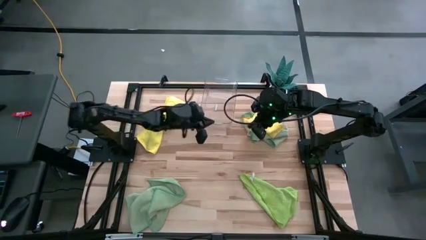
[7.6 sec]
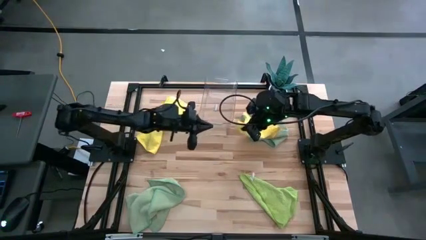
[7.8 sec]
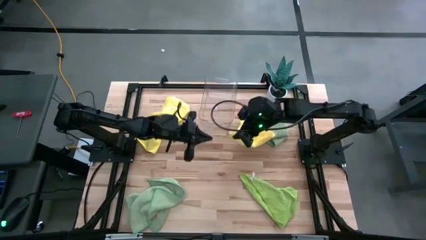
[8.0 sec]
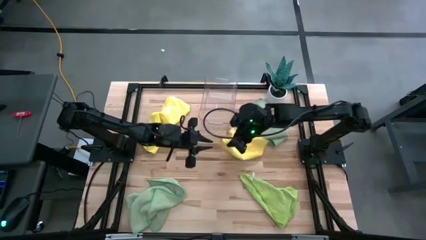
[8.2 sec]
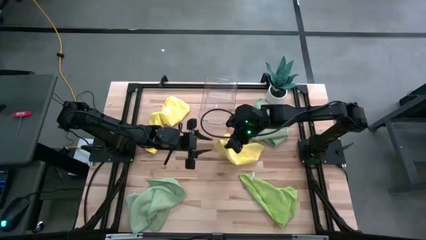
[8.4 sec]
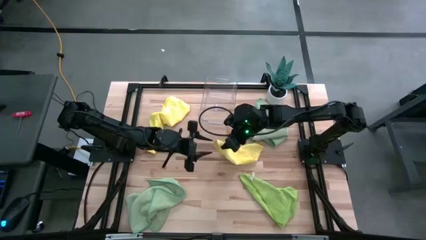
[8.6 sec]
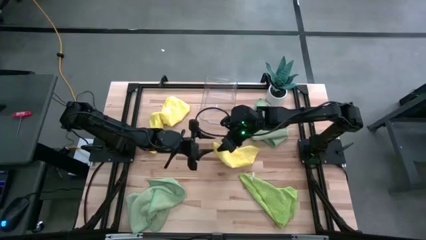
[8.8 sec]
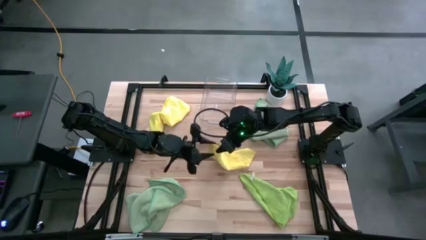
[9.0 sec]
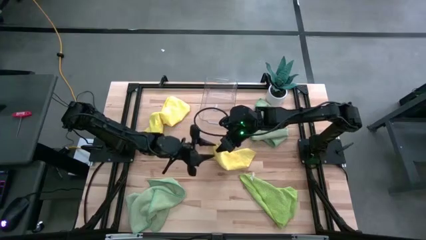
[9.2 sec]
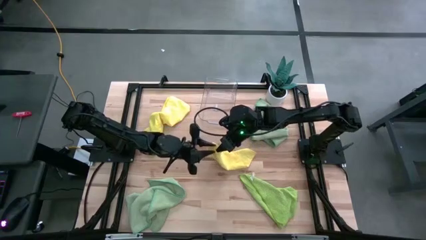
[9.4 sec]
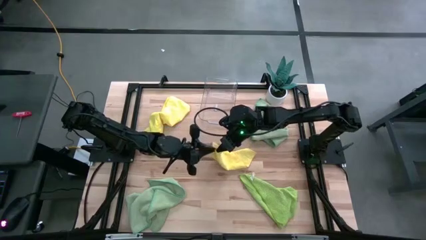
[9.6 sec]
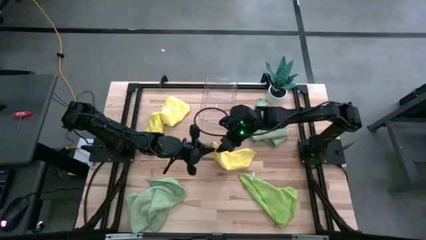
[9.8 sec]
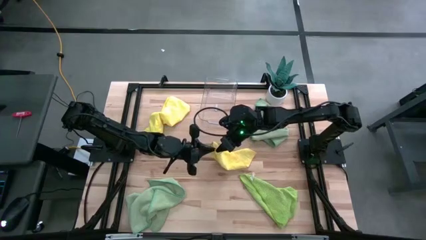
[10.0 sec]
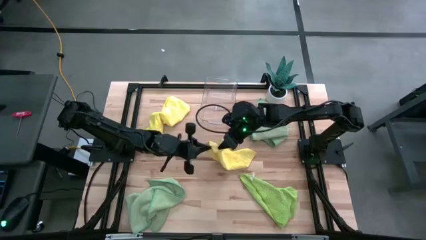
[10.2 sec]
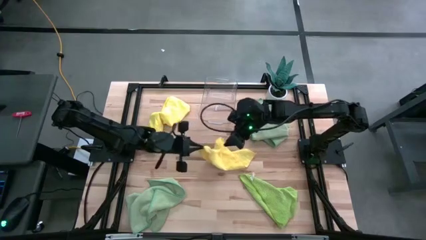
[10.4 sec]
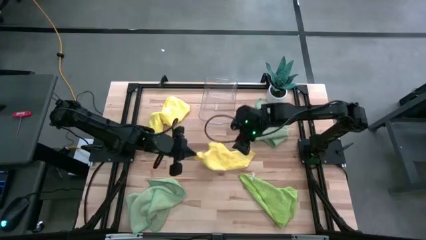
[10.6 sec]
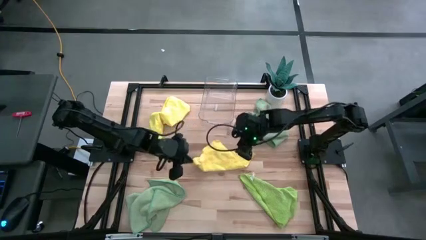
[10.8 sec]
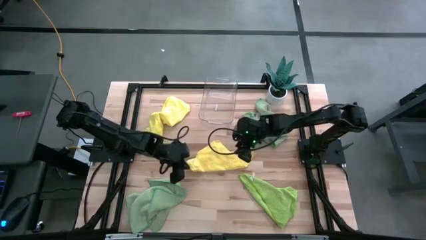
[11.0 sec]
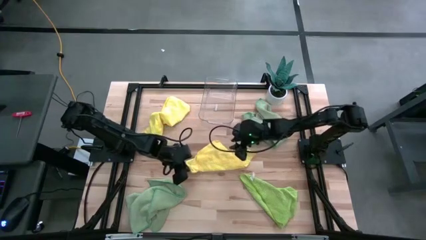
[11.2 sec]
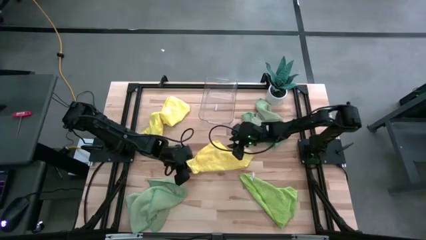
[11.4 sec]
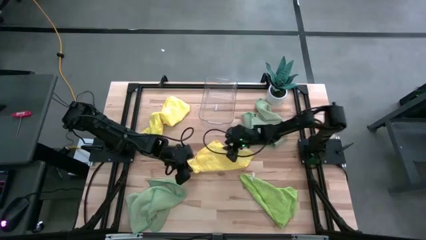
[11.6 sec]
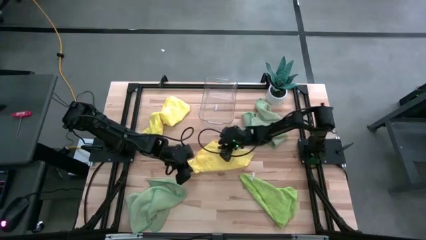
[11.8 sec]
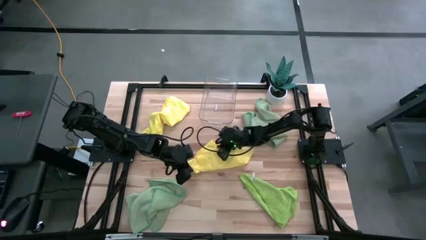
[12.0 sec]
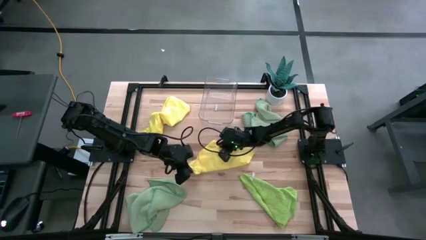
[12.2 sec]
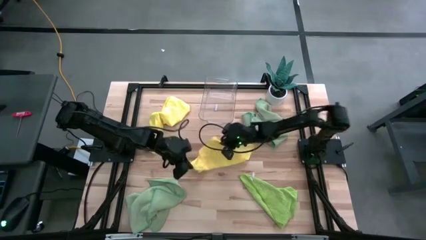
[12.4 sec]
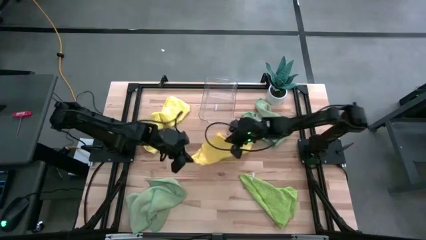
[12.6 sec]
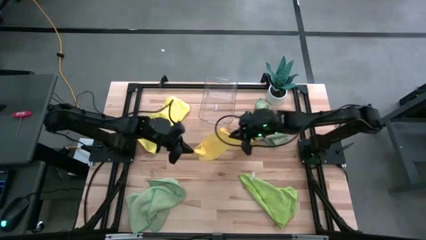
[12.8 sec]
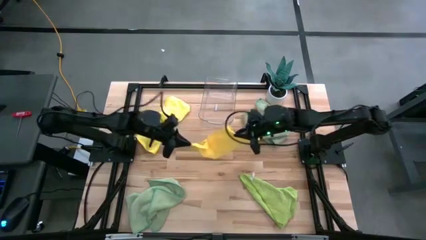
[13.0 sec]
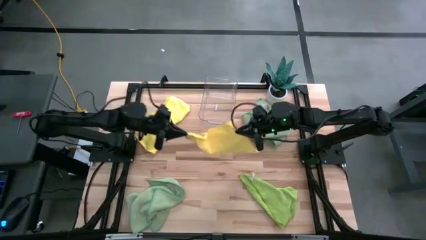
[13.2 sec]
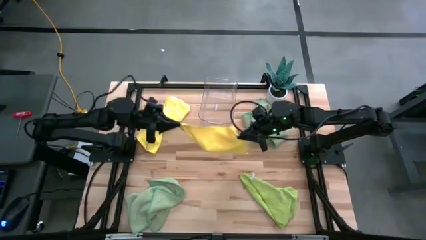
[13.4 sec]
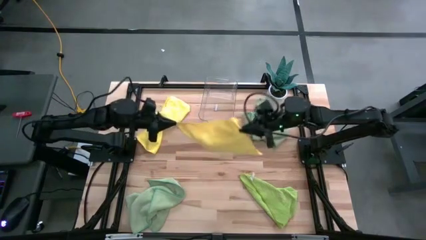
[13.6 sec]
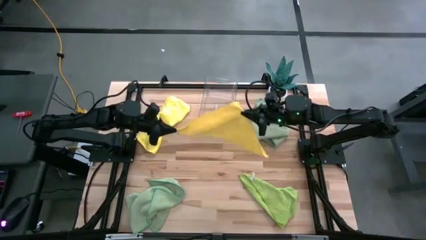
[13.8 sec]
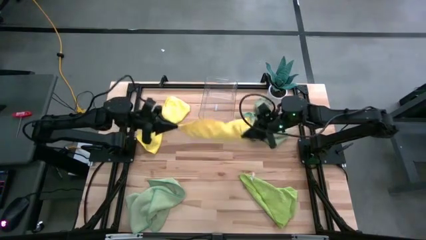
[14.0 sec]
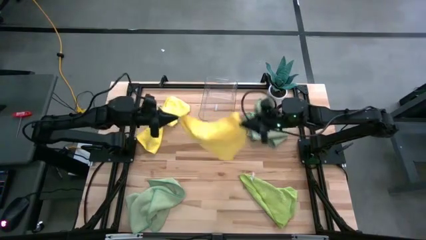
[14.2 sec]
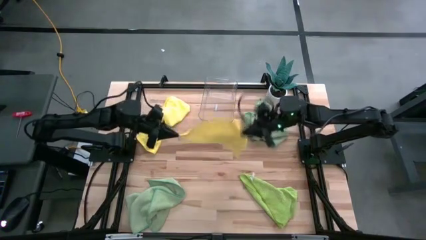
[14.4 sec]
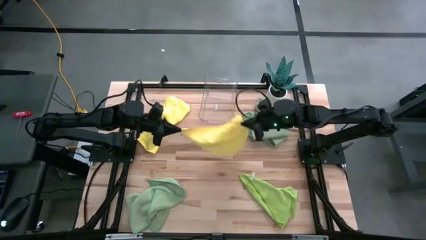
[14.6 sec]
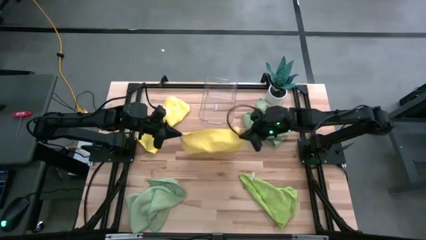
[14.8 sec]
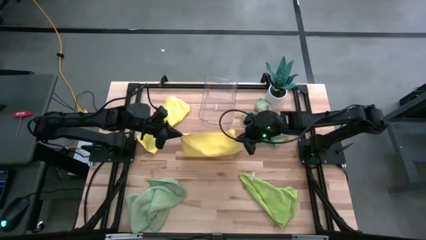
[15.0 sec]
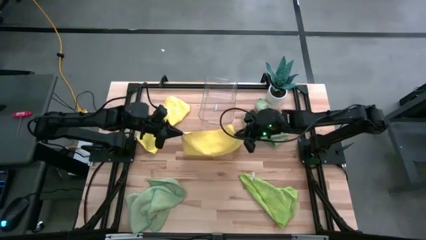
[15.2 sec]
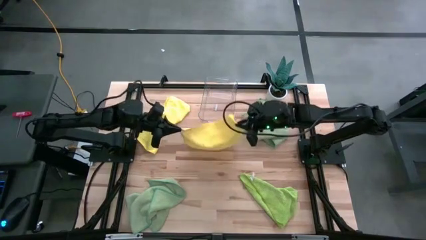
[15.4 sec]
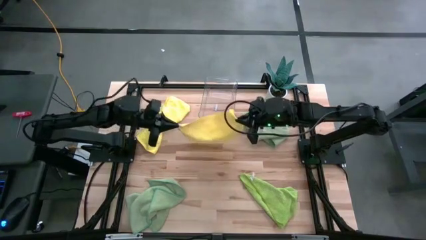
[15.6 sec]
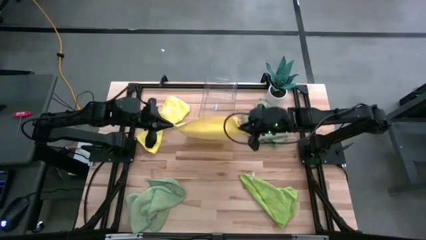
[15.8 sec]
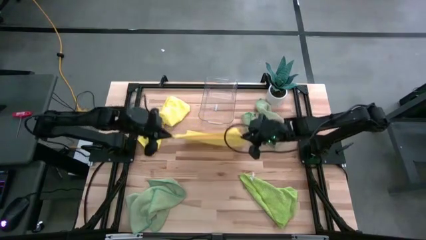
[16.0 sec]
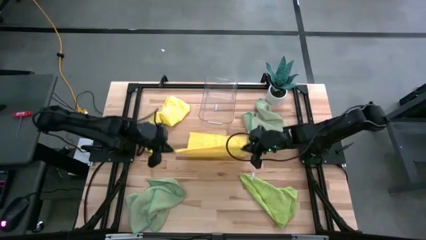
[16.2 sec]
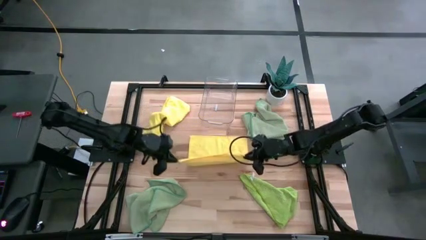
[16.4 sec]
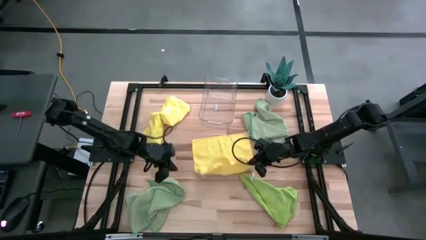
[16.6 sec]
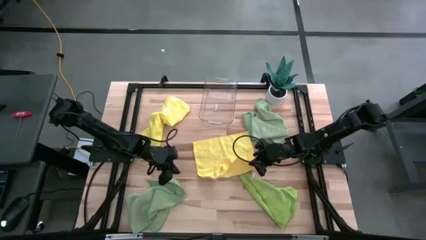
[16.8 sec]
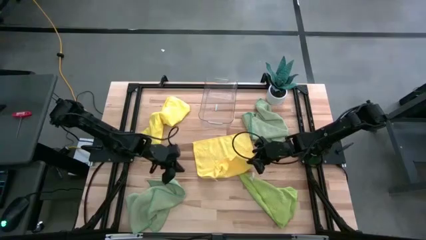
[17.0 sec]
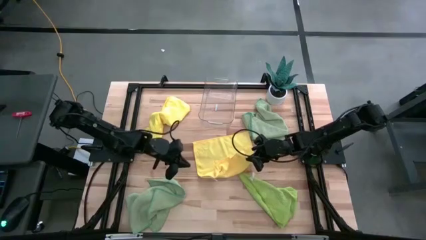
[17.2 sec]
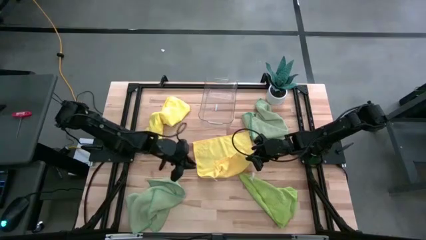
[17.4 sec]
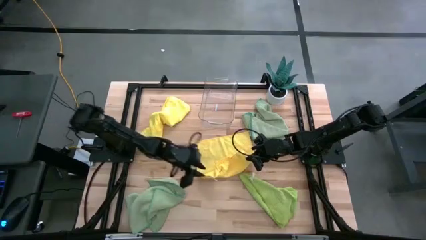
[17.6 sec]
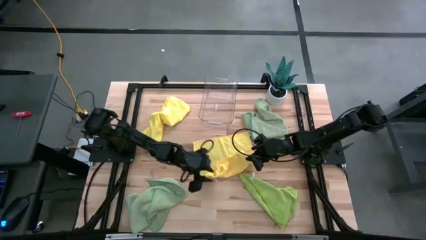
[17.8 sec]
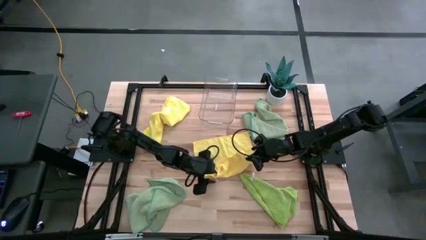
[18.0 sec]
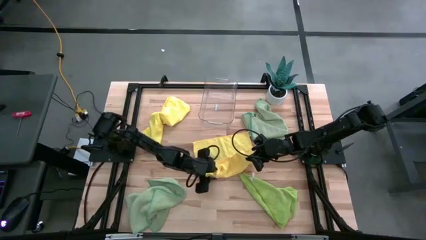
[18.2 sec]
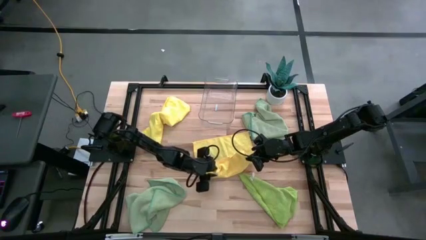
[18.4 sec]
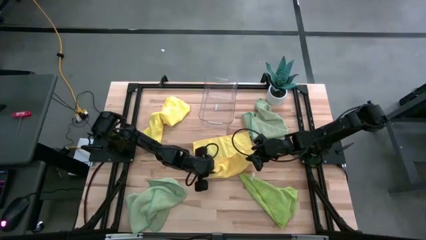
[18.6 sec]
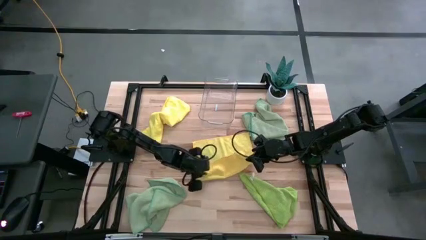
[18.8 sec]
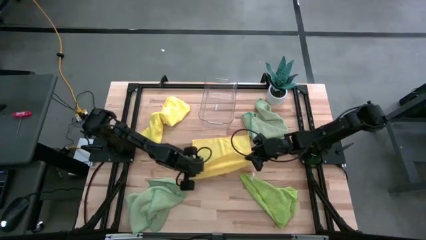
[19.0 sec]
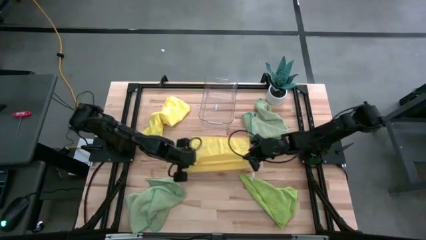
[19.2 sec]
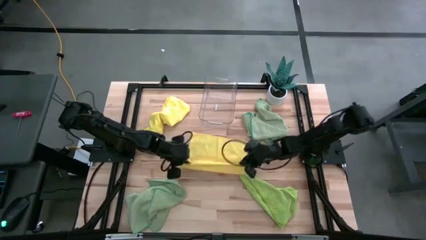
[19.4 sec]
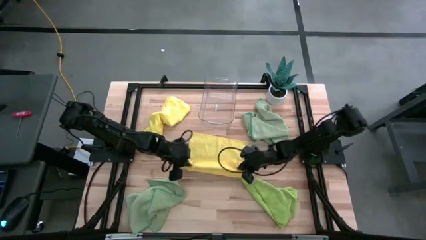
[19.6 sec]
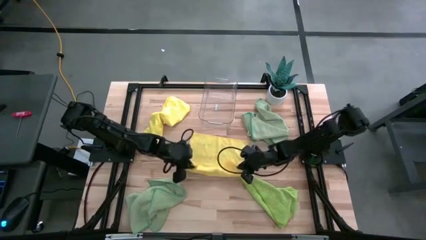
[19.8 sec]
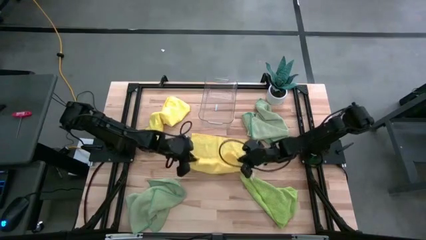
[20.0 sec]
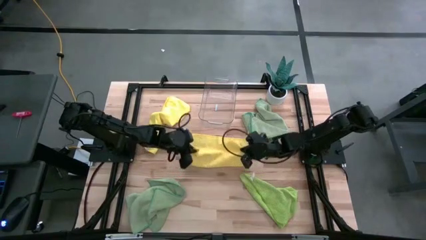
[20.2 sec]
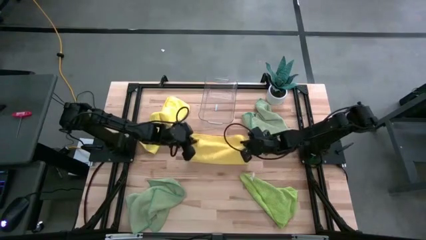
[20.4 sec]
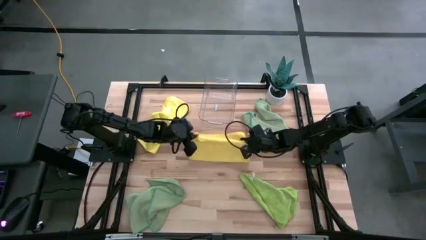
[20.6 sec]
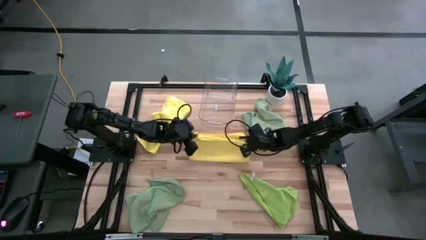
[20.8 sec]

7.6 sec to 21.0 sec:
Task: Fold microfiber towels
Fold the right yellow towel
